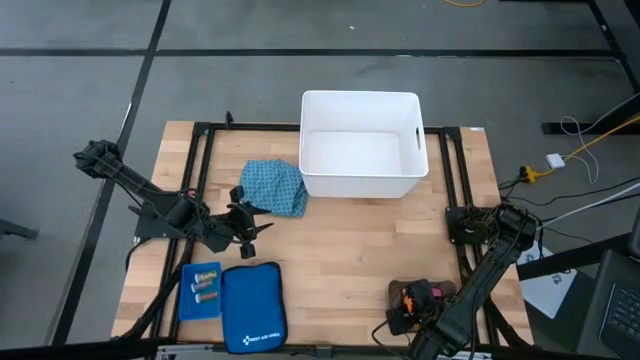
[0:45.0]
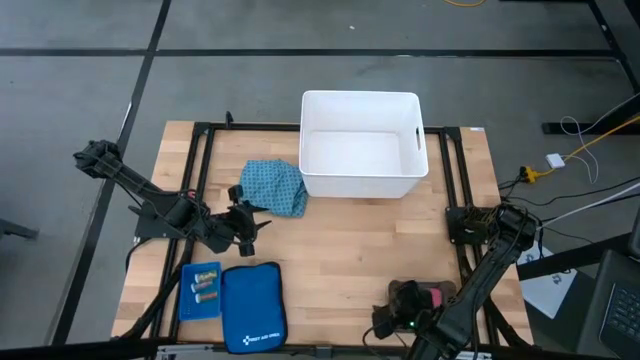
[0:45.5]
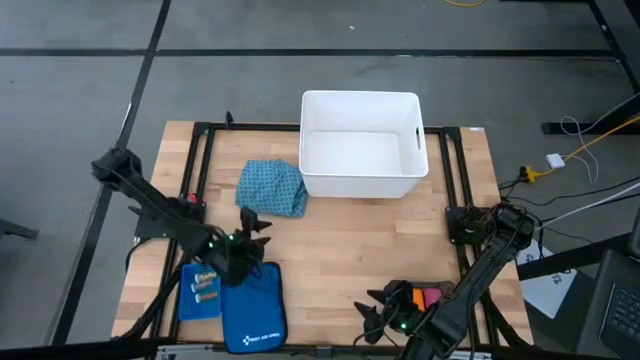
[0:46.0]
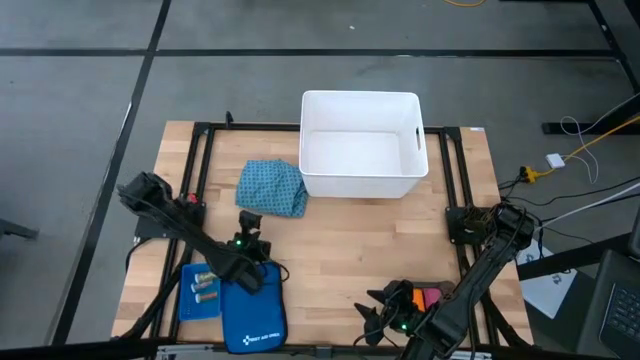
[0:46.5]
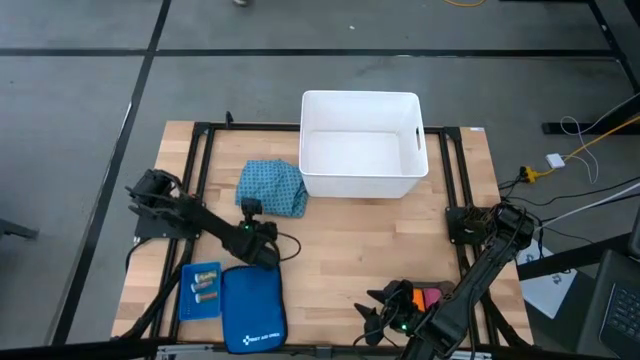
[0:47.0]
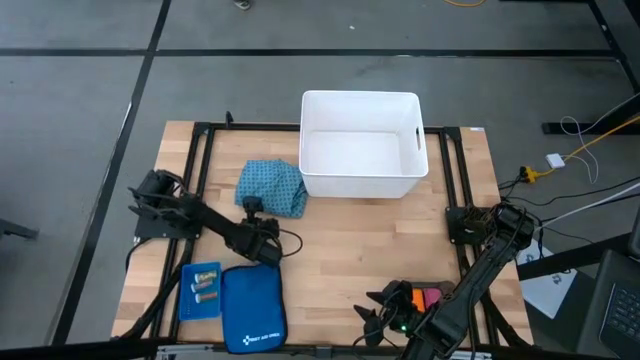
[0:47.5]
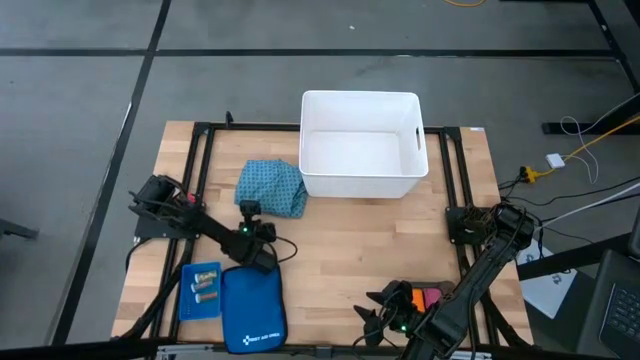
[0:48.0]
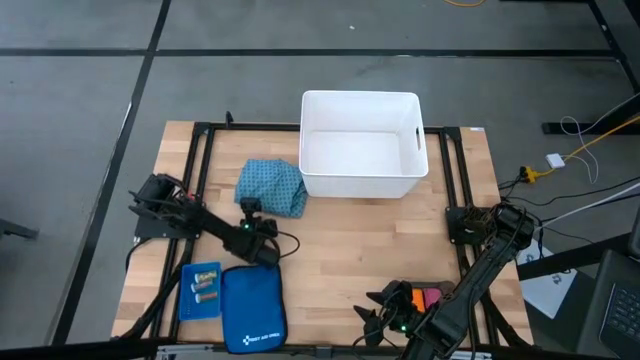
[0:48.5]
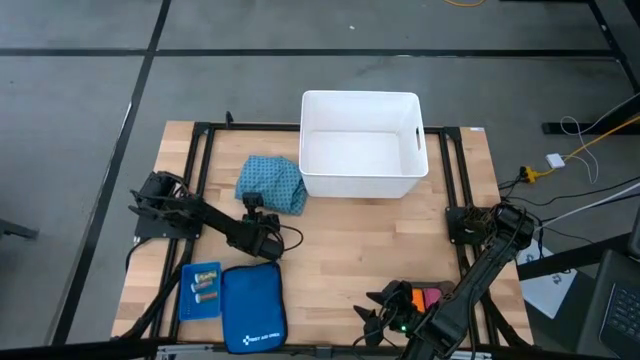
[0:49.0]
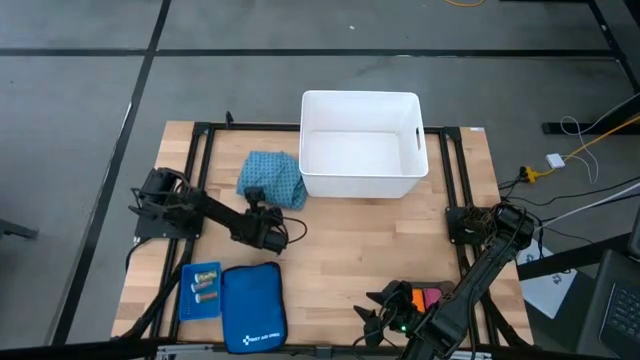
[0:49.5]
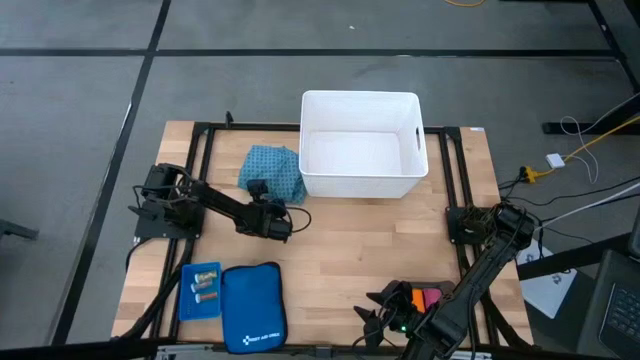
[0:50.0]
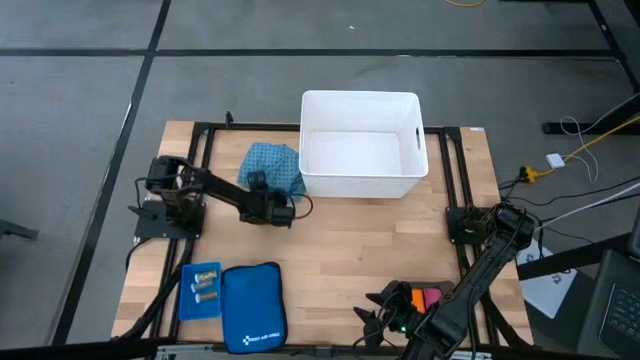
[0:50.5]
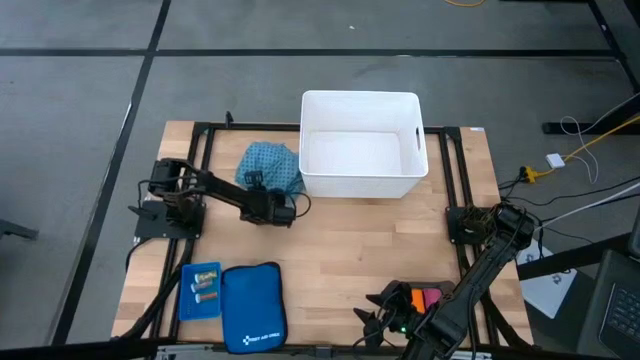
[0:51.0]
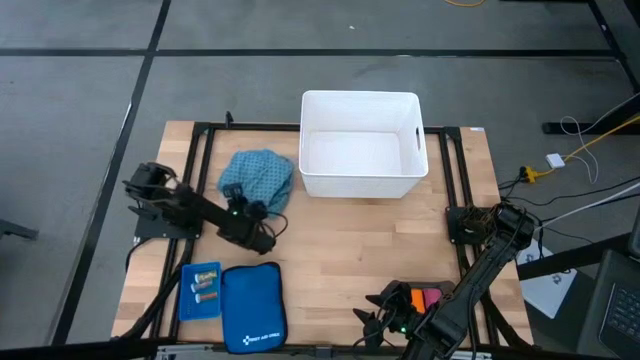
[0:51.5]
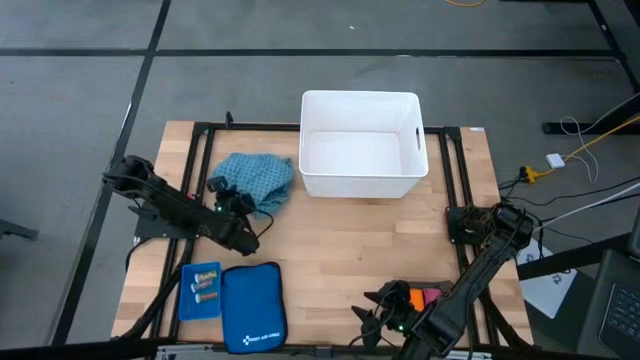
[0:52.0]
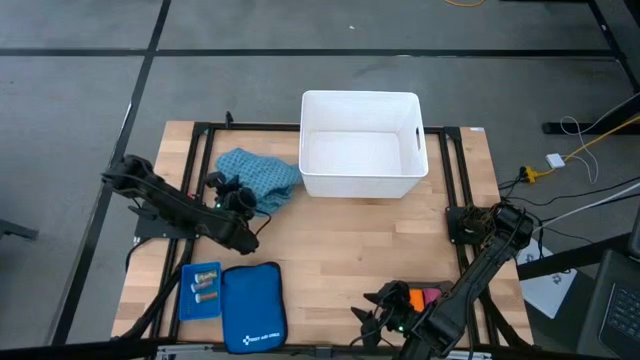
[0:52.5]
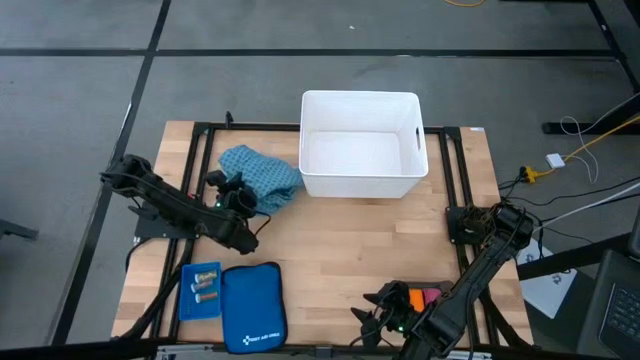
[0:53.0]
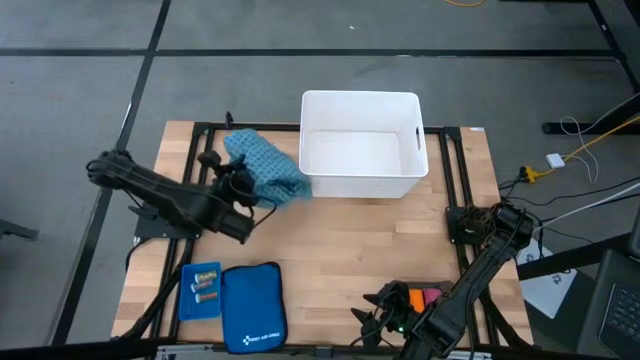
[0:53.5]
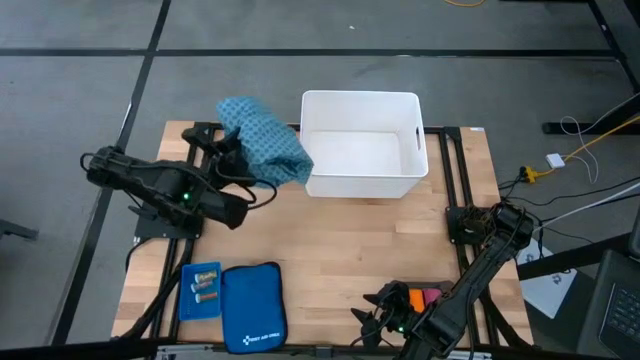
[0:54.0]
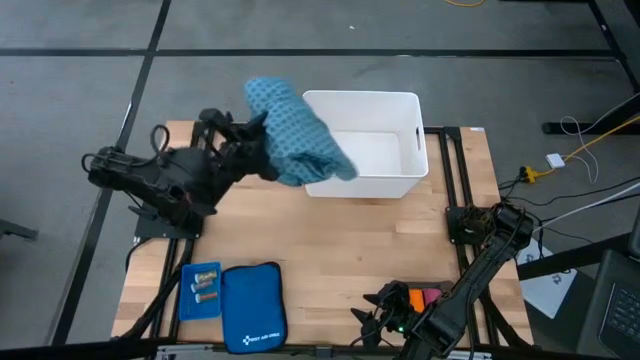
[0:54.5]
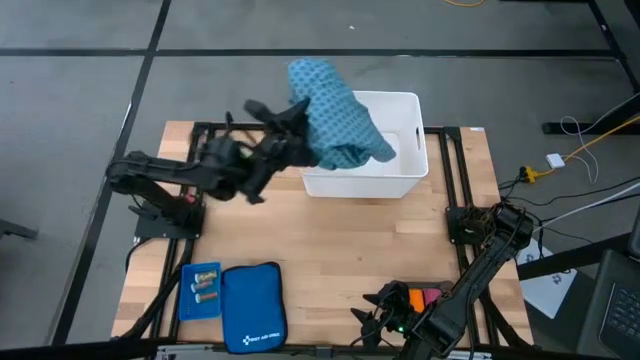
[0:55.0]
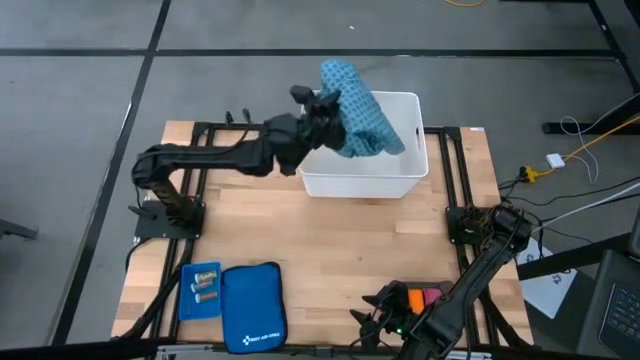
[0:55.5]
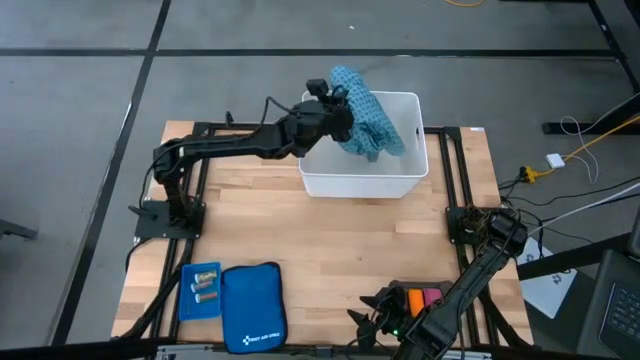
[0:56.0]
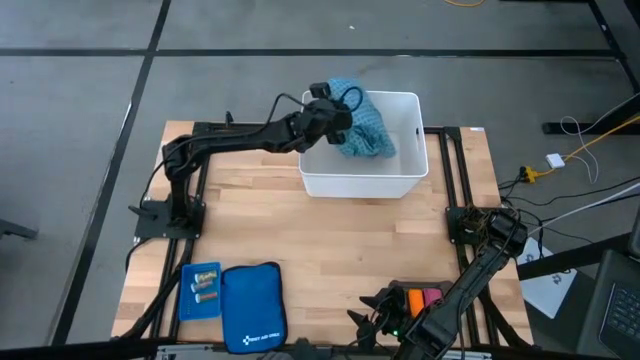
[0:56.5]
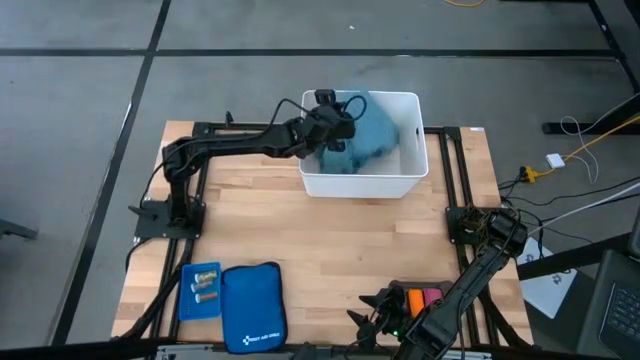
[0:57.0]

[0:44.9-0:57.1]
Task: Pick & place medical supplies in basket/bin
Put the green patient gown into the white bin

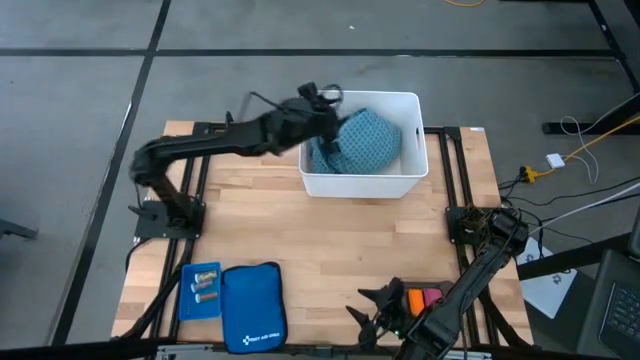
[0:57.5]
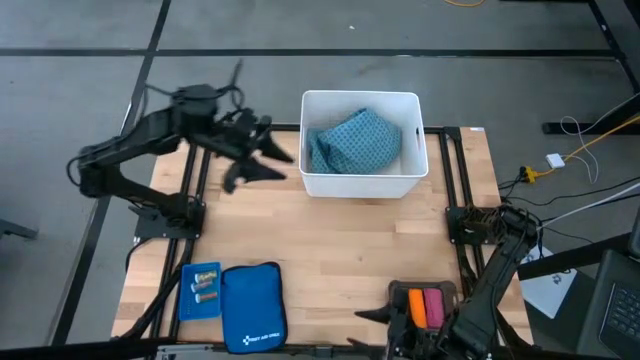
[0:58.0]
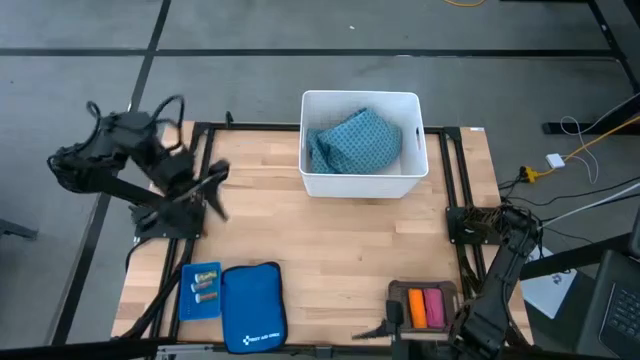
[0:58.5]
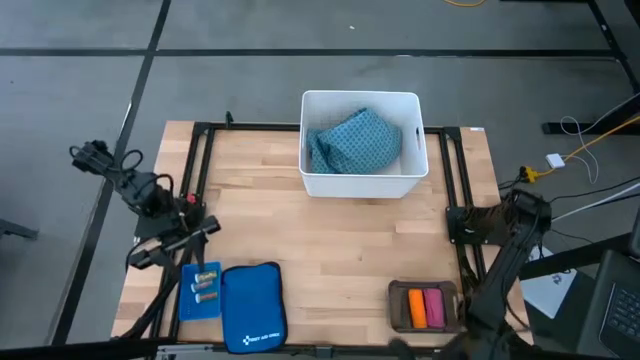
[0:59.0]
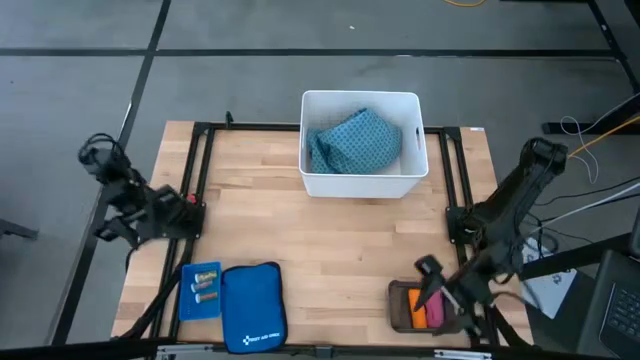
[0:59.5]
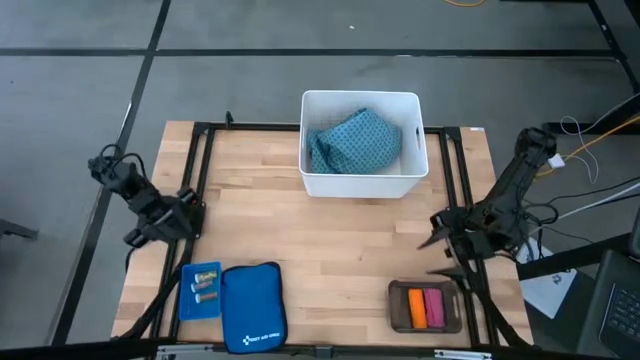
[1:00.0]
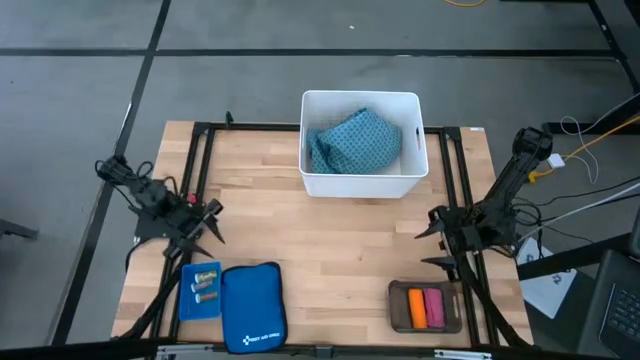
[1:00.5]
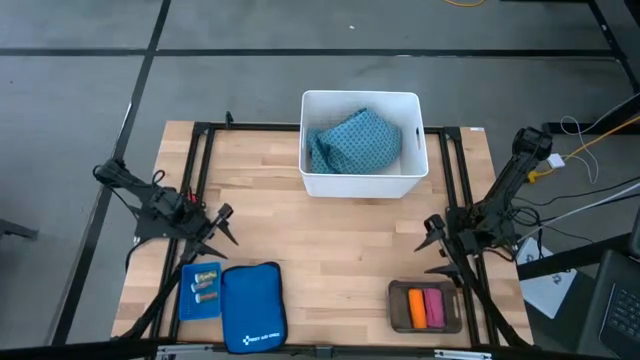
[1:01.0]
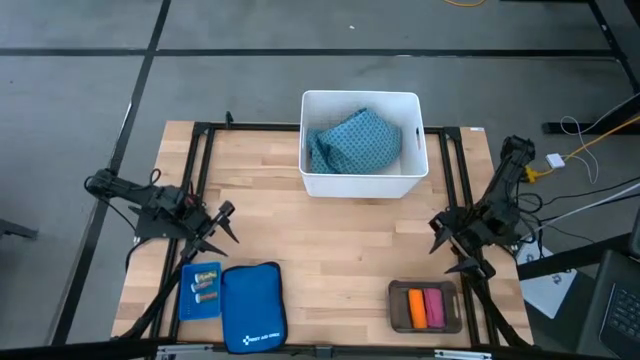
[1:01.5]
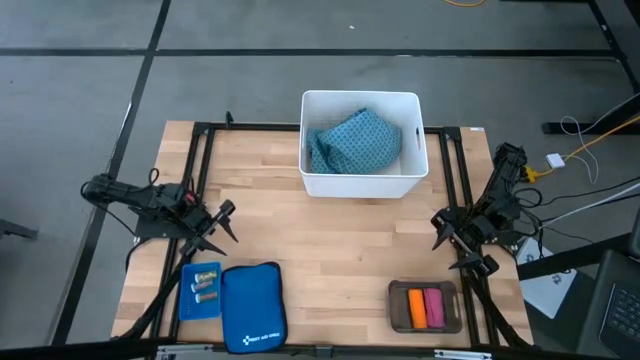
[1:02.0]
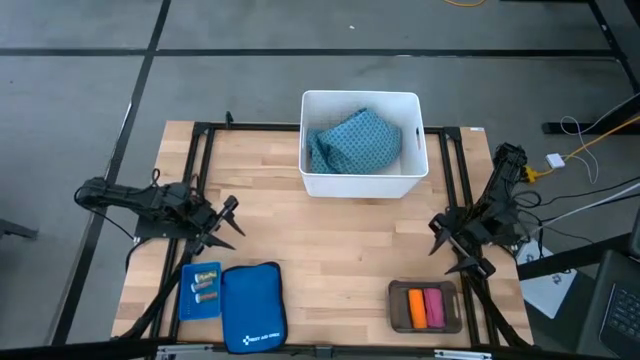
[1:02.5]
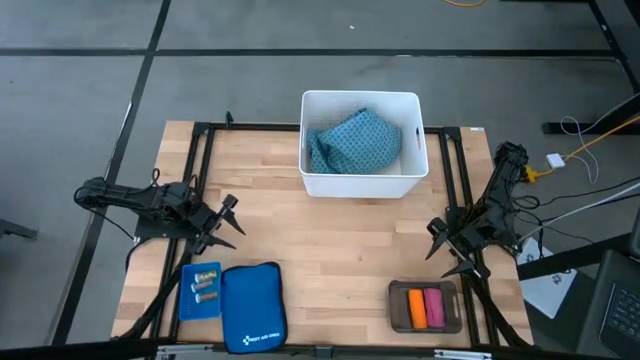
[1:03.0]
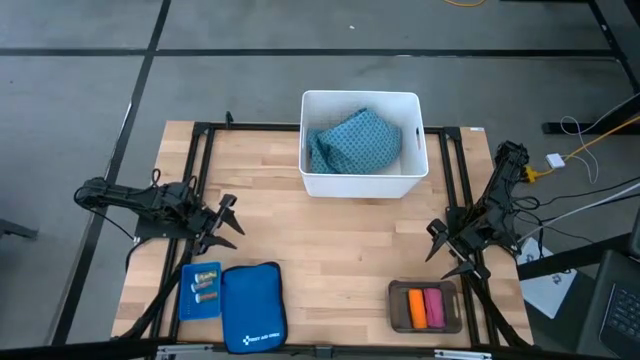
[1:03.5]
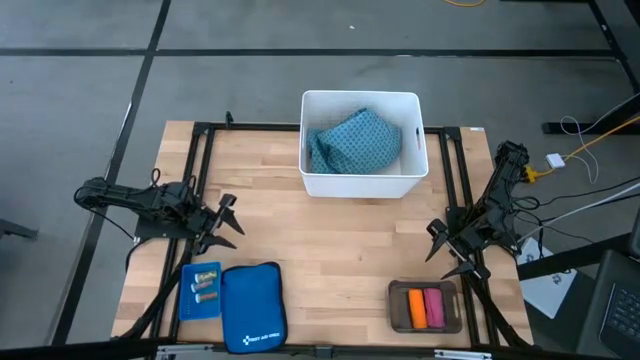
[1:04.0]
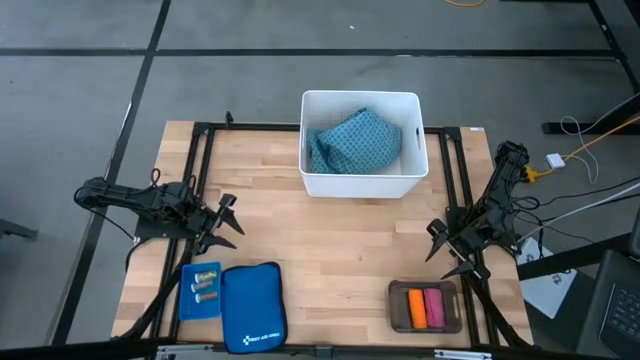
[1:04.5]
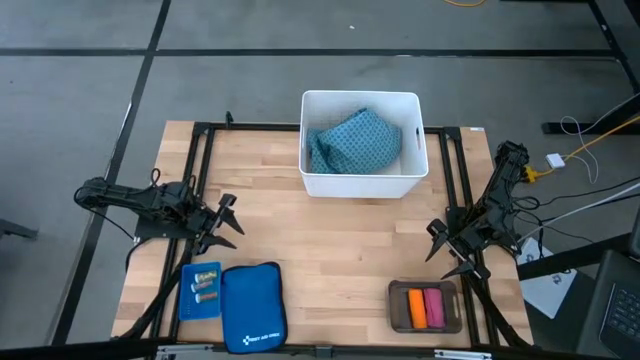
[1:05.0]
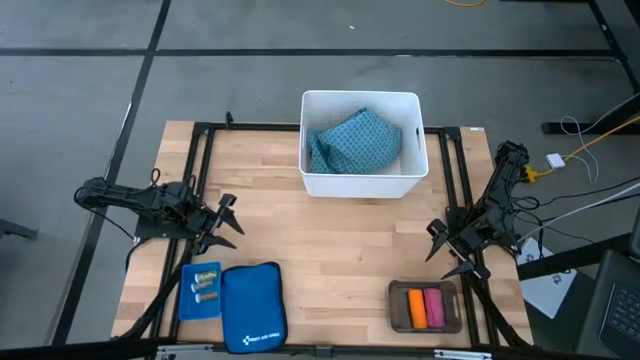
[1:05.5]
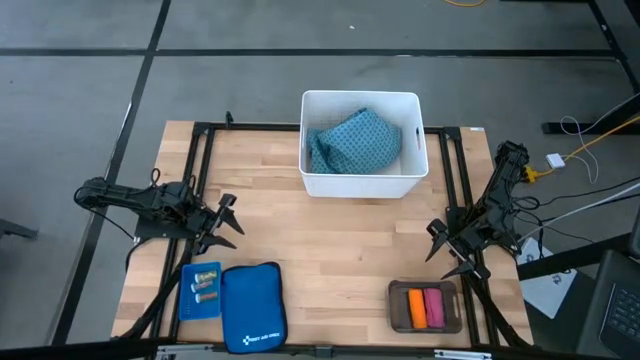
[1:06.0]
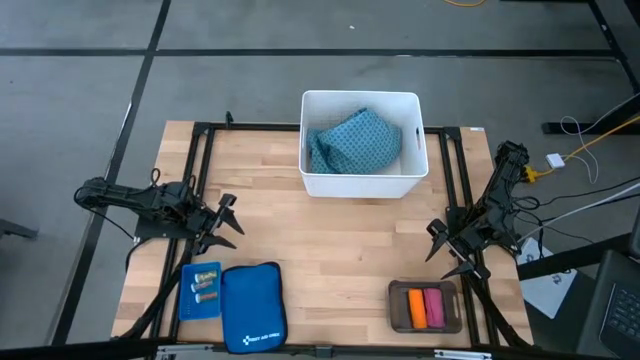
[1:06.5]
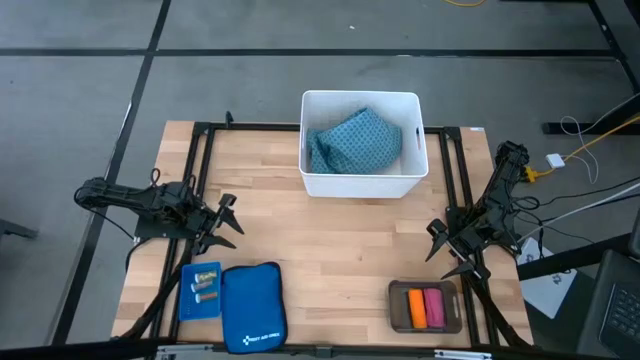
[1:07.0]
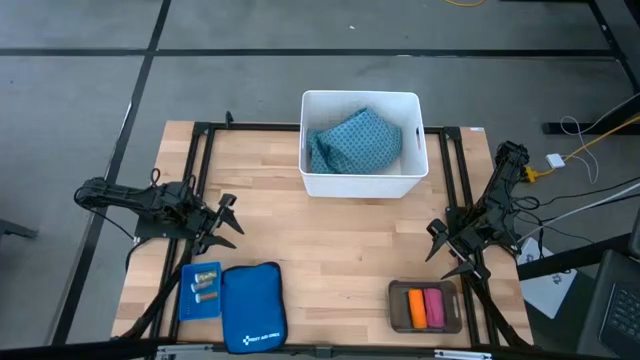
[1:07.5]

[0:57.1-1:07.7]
Return to Home Position
